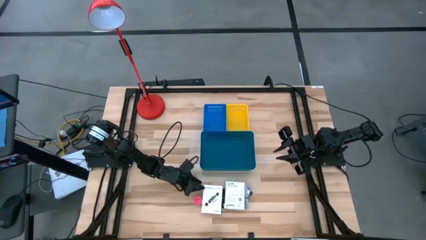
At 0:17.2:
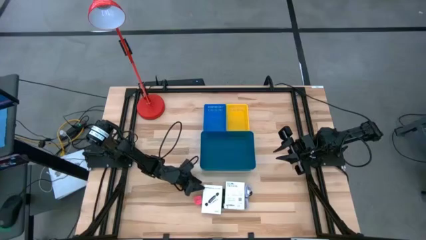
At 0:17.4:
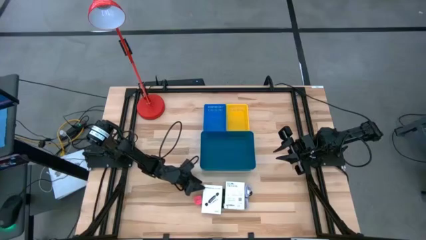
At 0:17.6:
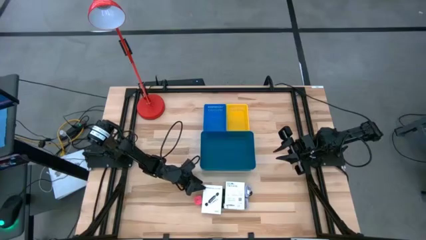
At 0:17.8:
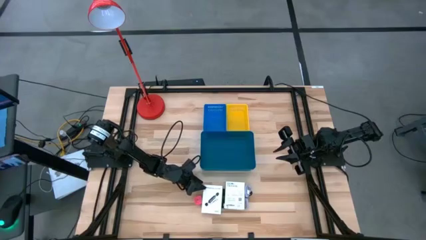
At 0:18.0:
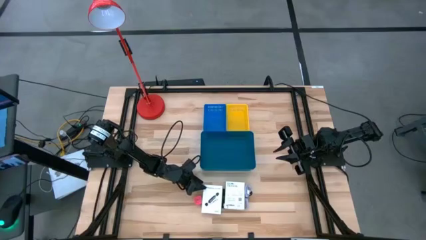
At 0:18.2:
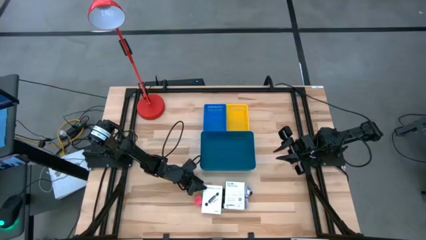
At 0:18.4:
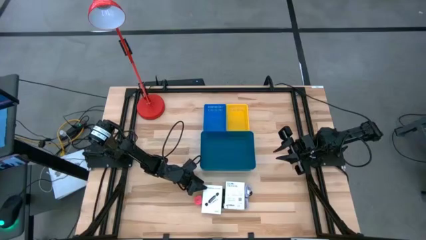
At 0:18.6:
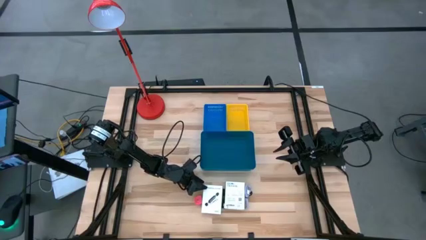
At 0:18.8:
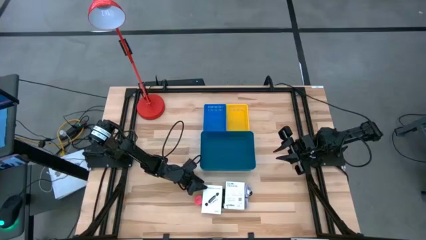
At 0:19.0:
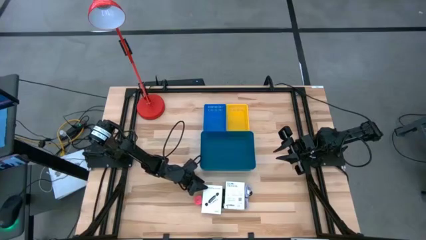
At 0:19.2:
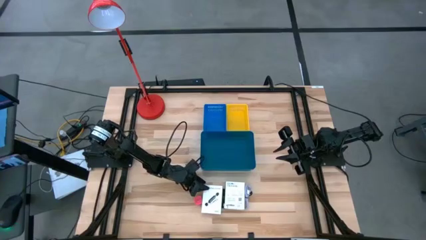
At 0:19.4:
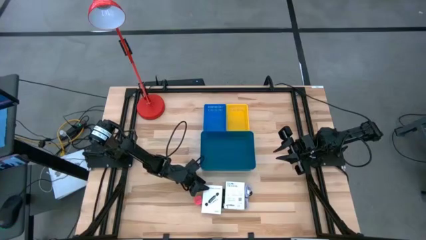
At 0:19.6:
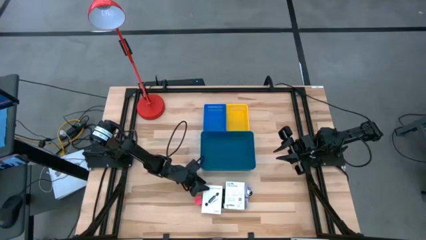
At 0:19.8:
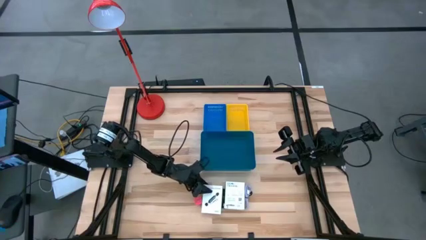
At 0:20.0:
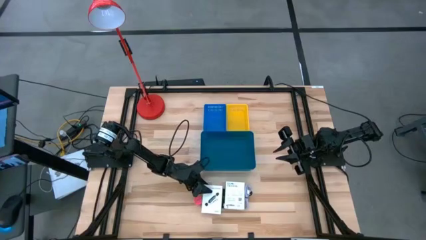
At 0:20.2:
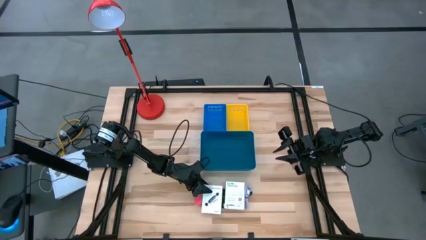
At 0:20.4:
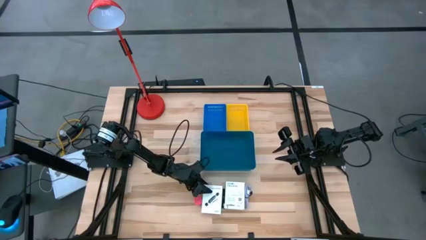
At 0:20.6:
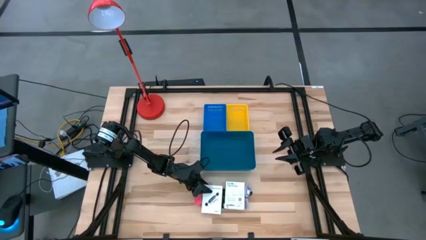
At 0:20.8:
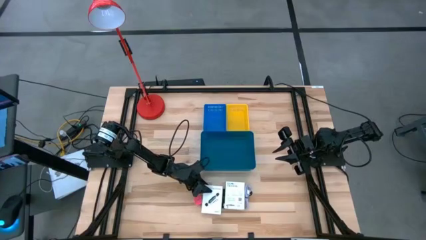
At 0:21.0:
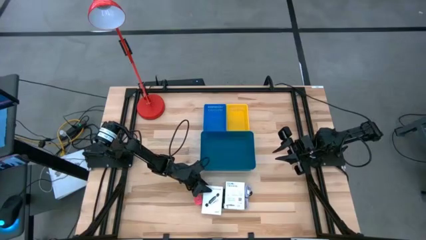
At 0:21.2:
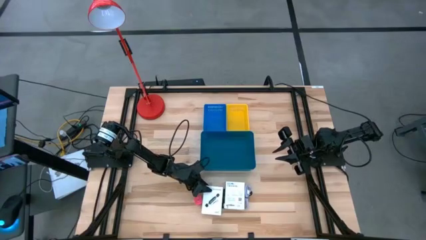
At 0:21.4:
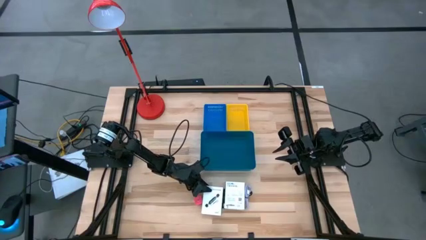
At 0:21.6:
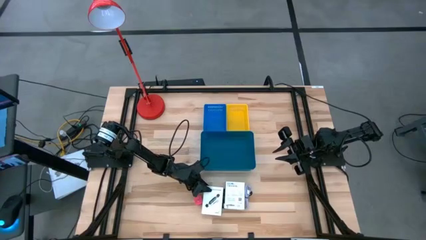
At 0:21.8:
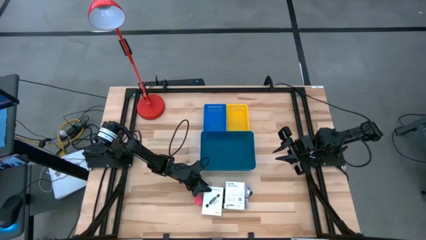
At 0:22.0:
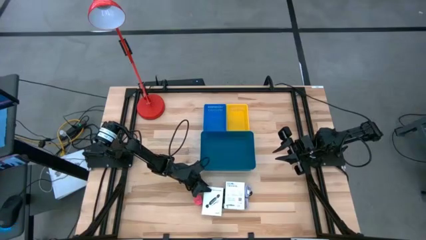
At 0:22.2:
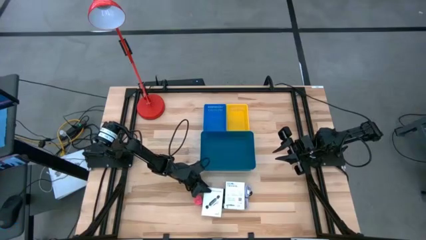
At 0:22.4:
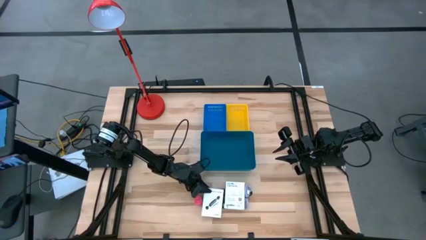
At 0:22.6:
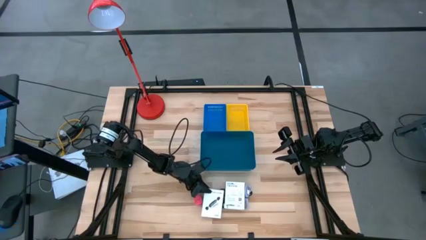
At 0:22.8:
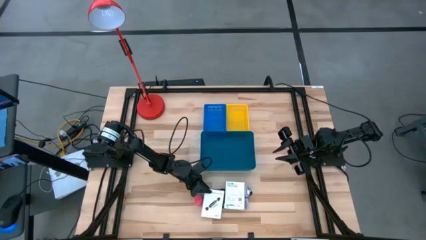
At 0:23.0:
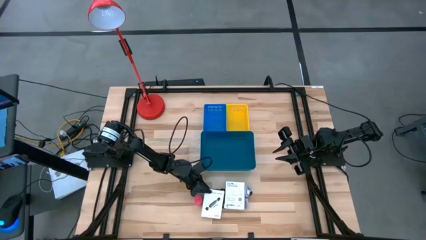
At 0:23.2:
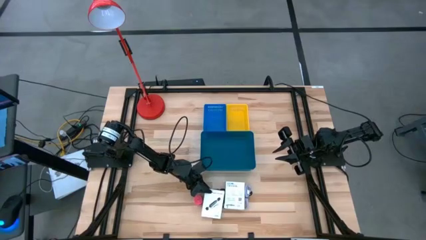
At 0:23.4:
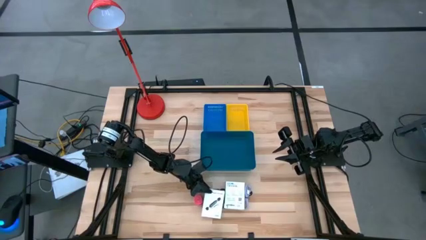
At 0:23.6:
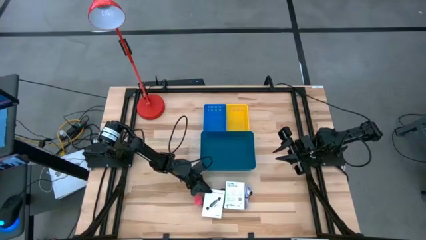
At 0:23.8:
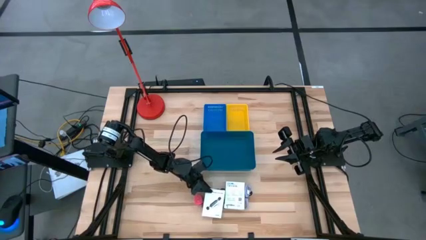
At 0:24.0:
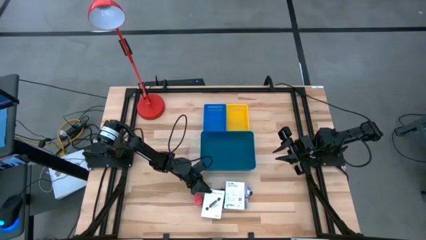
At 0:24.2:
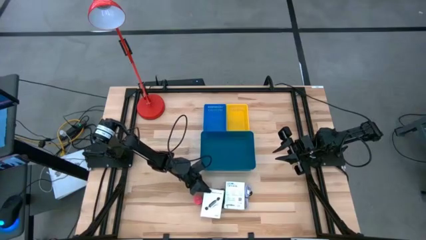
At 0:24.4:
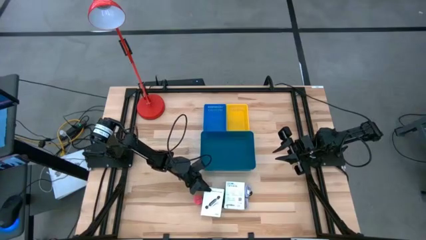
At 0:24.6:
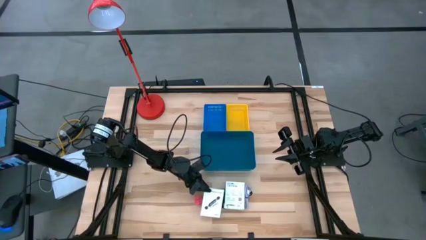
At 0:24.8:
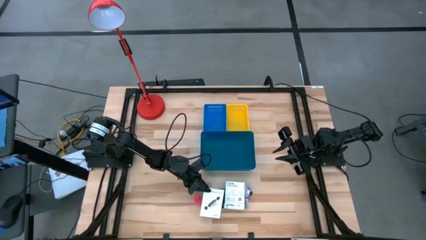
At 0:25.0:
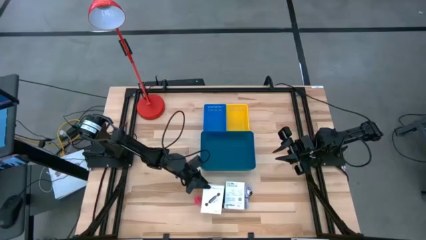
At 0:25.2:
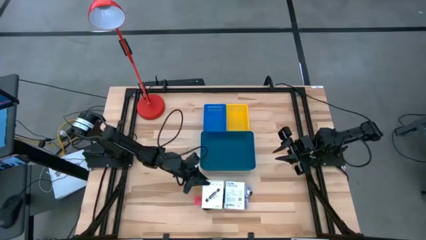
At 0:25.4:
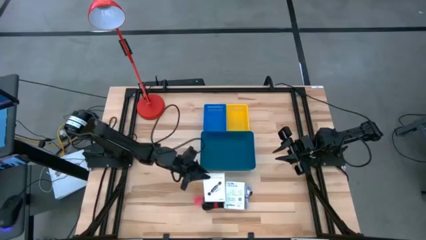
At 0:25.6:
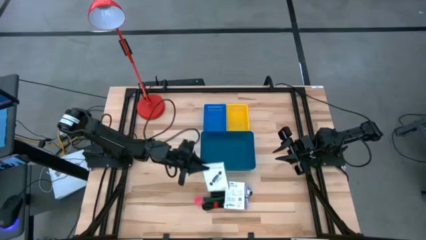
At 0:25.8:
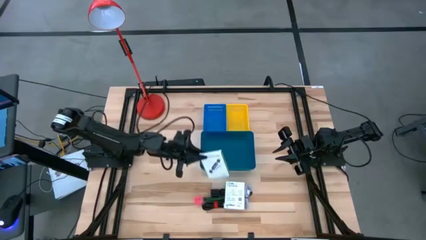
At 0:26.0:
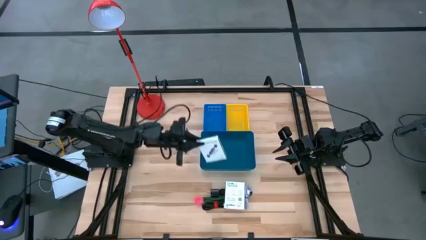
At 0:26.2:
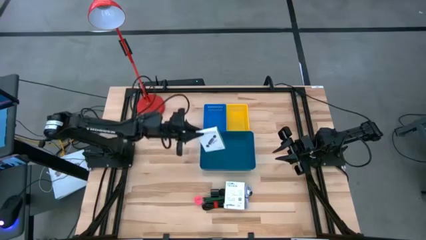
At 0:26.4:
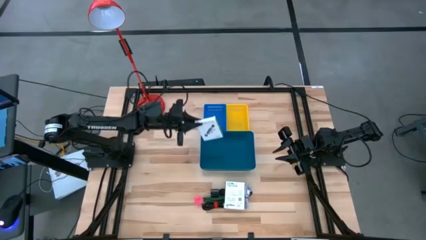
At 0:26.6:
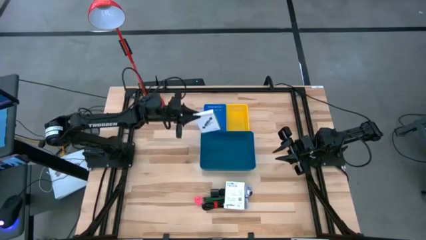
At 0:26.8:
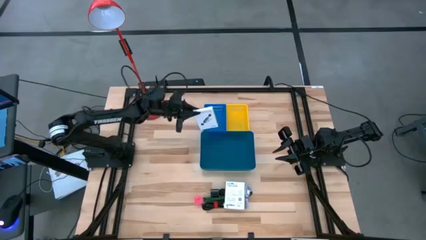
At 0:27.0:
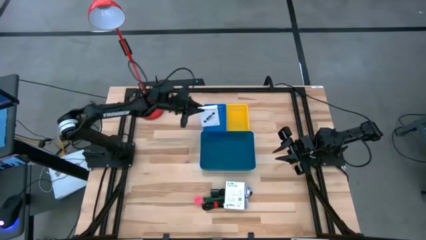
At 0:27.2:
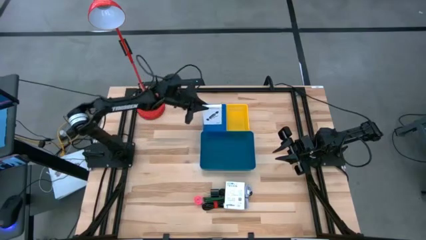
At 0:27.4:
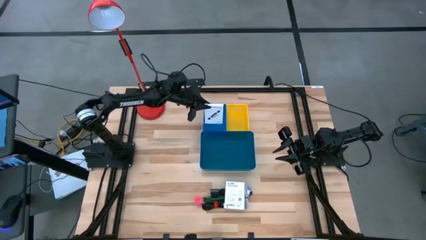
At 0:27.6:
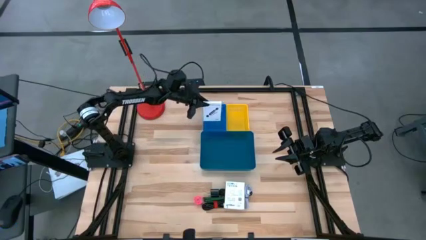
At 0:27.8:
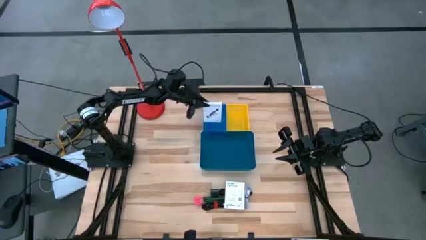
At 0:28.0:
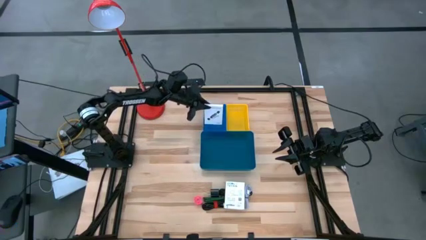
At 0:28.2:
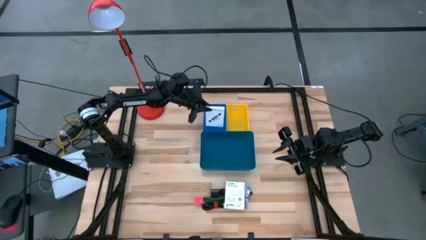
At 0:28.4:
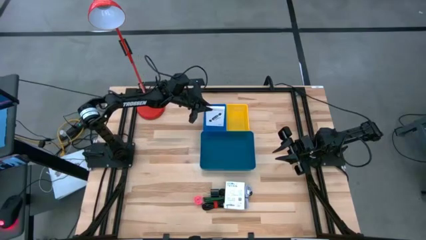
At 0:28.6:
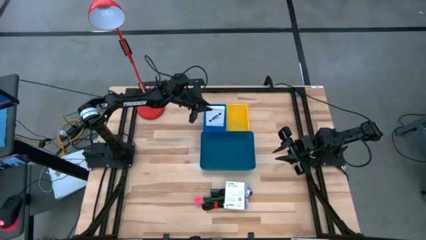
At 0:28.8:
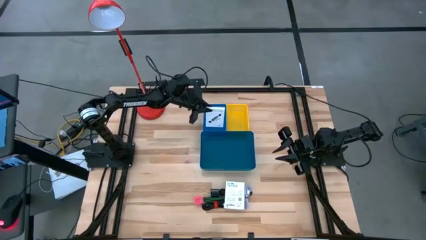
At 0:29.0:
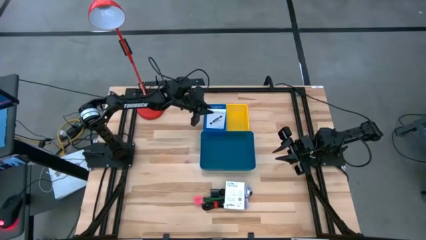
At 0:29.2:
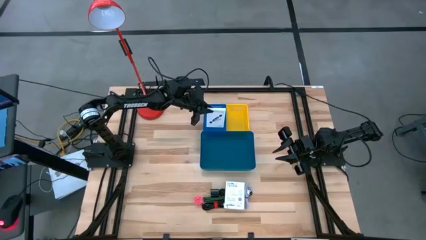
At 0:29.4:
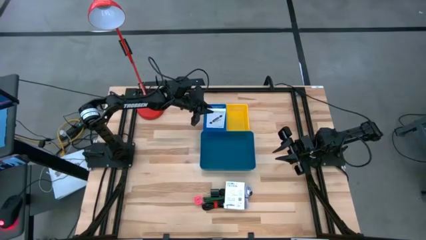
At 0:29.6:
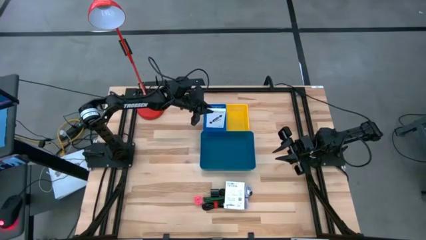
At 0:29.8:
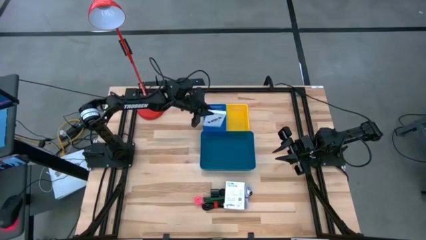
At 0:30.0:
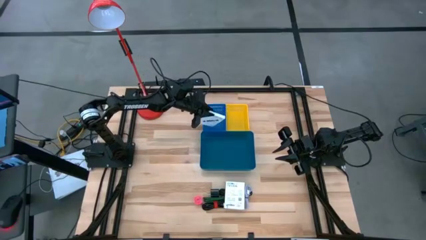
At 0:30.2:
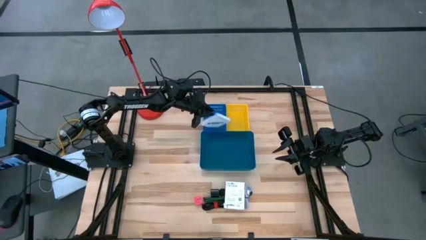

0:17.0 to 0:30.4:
Task: Pick and place items into bin
Put the left white card reader box into the top blue basket
